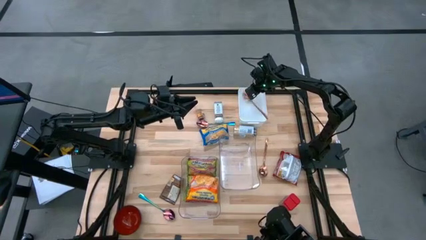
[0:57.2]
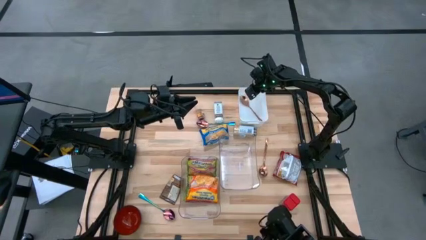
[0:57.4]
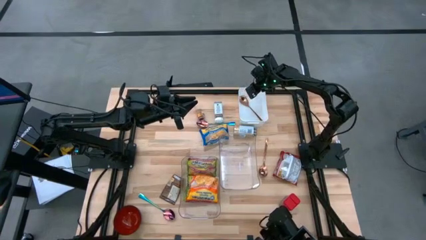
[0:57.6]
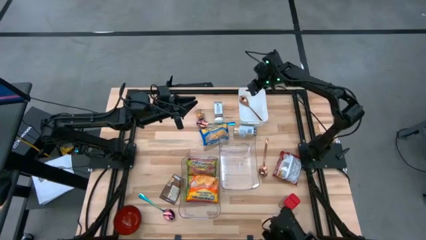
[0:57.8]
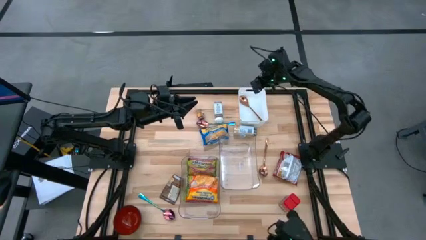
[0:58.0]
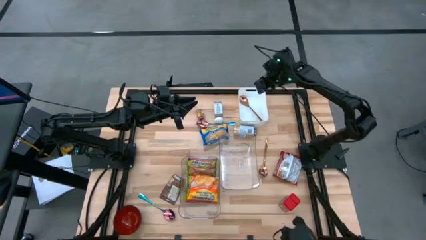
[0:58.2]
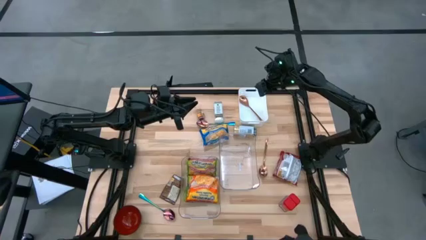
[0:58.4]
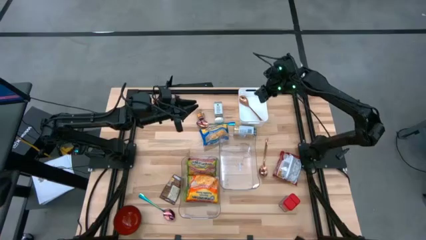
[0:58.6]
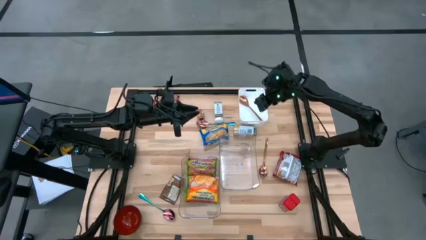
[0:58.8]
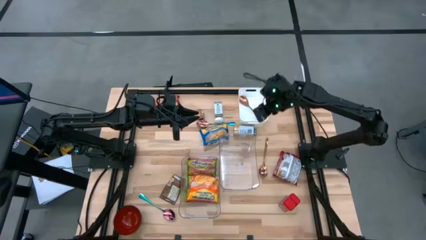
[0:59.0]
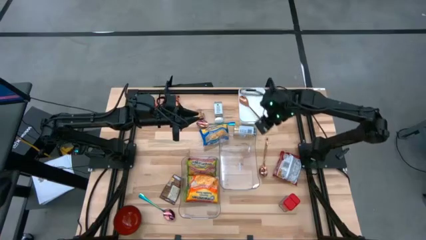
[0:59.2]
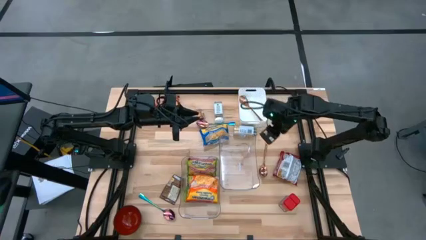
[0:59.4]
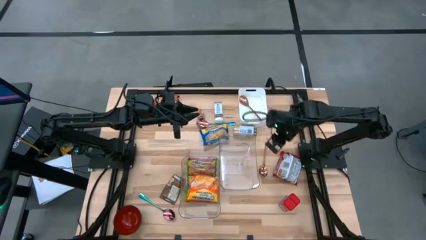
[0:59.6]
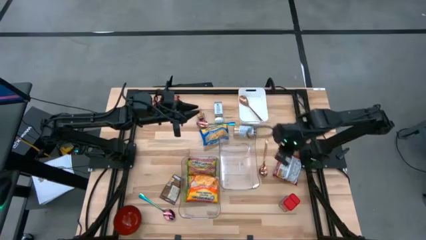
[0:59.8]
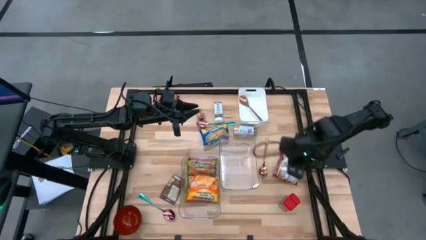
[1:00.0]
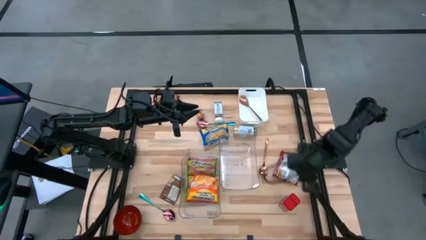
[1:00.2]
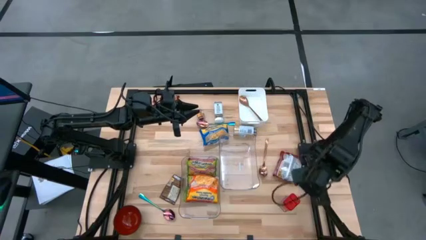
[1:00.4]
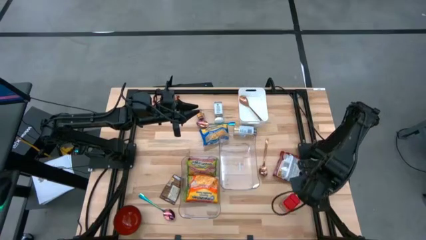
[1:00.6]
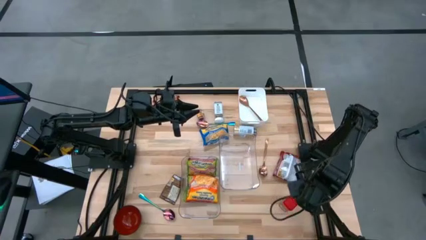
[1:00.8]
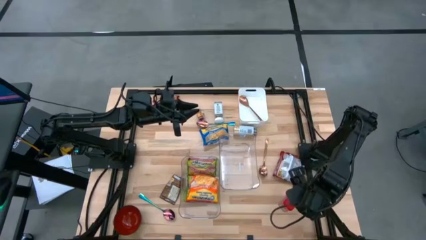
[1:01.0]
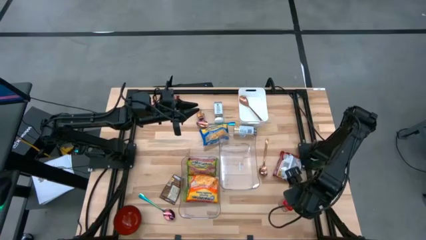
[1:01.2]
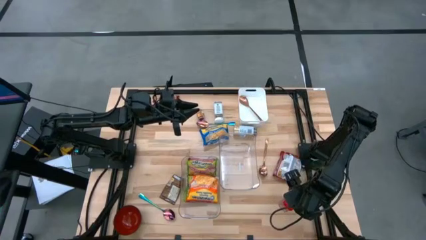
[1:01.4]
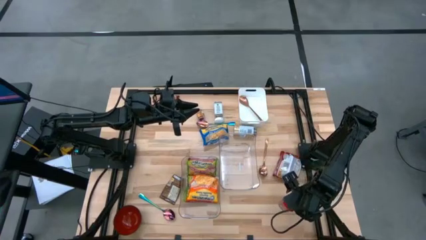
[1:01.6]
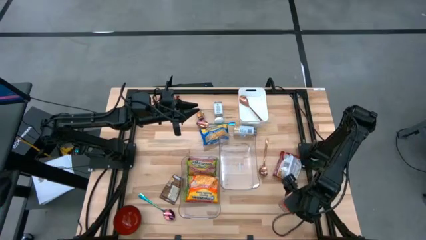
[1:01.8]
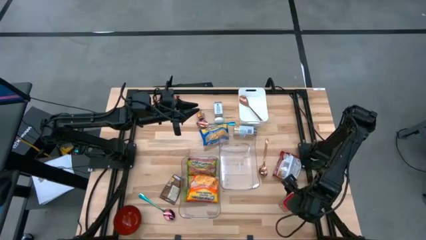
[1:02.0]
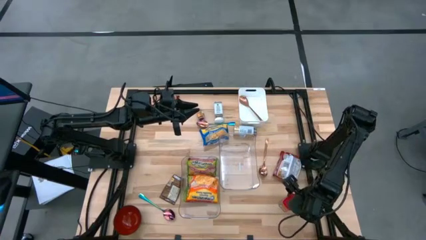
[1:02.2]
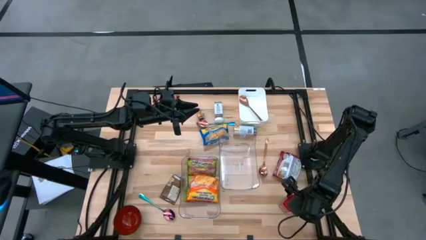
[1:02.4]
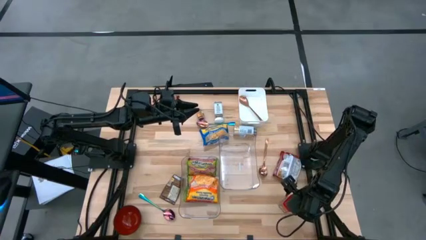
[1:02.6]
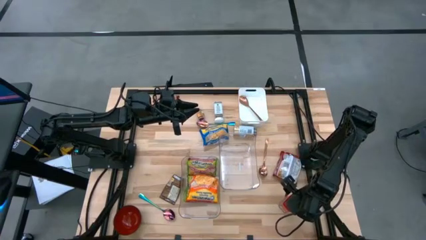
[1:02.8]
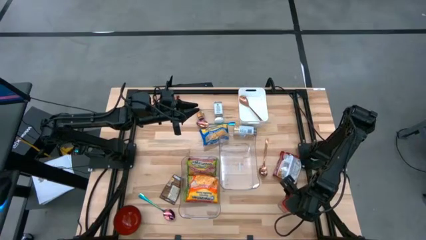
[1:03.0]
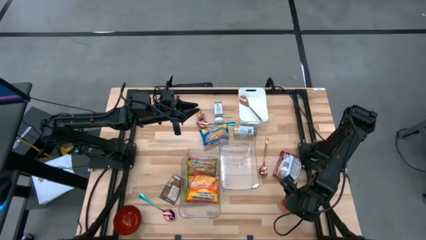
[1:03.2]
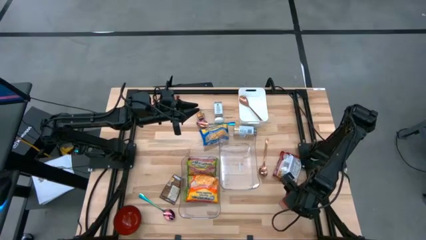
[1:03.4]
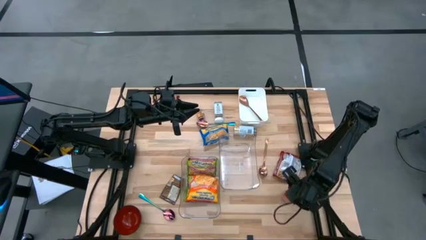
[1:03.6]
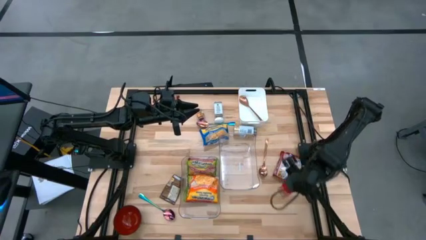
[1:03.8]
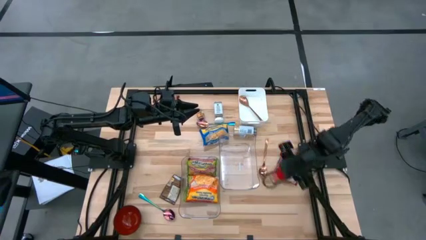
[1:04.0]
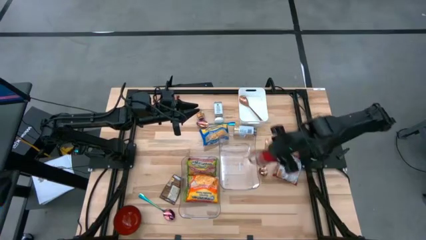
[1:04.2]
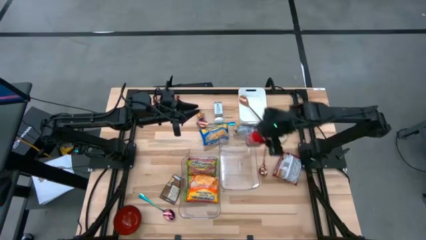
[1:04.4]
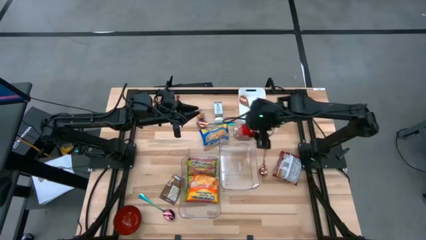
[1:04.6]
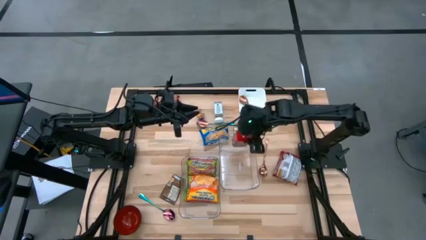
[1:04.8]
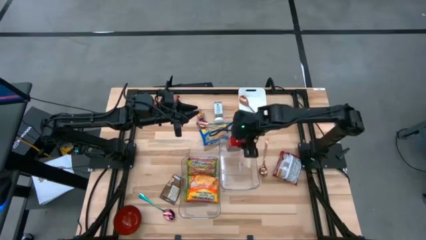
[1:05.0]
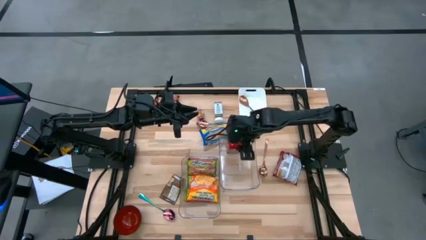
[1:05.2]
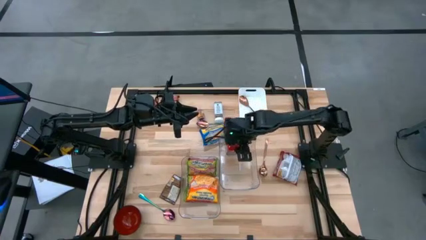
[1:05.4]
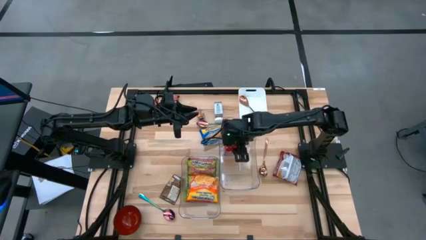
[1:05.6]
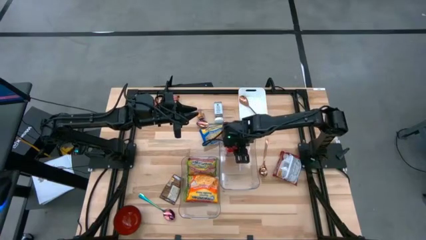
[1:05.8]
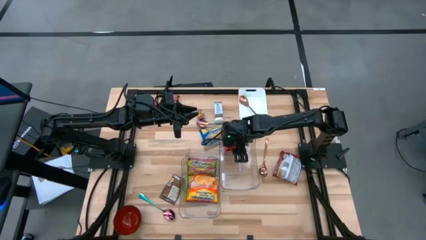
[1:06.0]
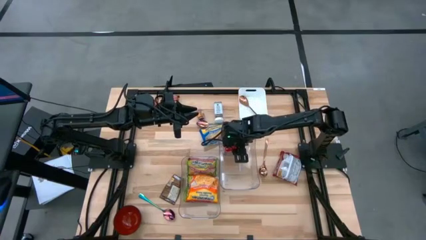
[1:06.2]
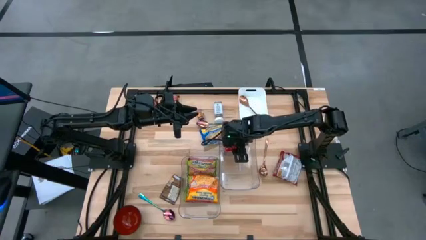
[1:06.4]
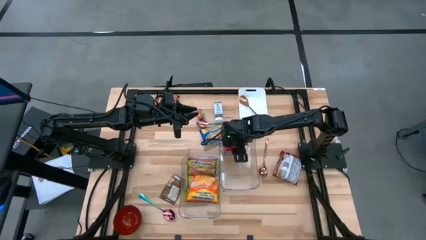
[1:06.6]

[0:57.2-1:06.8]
Task: Pick & Place Food Item
Put the red seasoning can into the right transparent bin

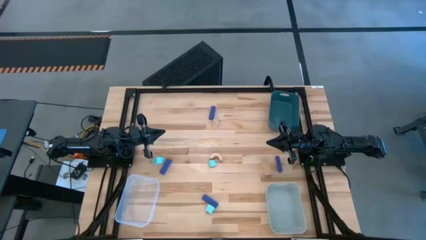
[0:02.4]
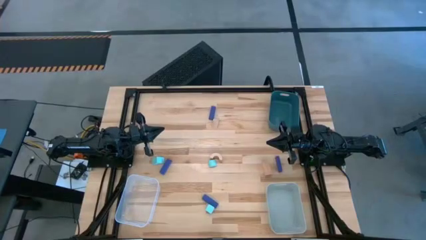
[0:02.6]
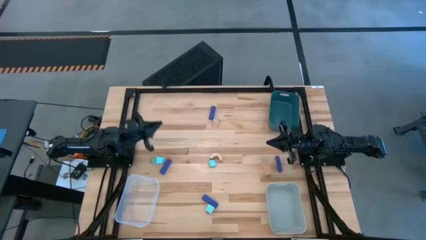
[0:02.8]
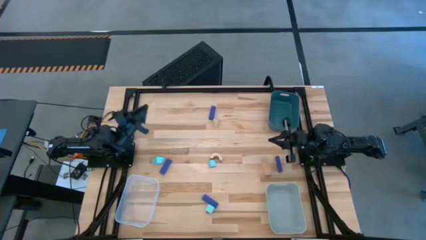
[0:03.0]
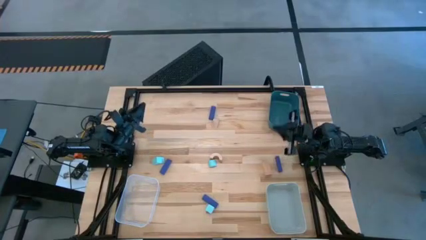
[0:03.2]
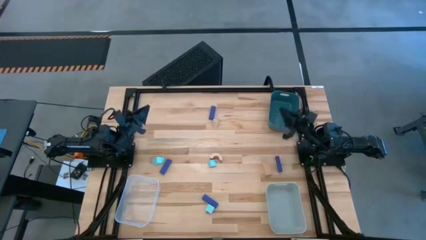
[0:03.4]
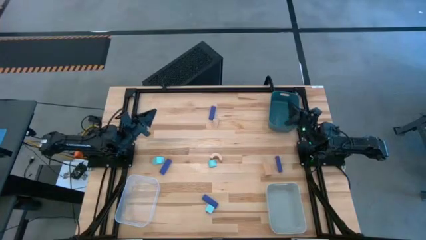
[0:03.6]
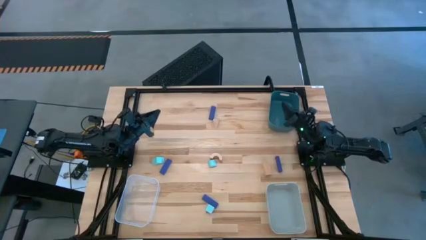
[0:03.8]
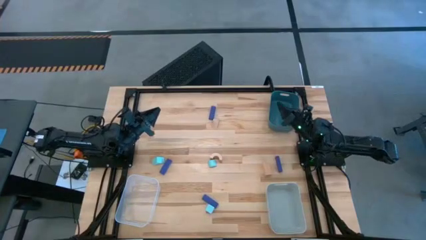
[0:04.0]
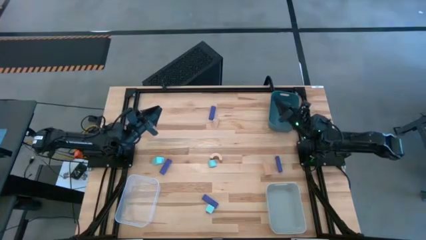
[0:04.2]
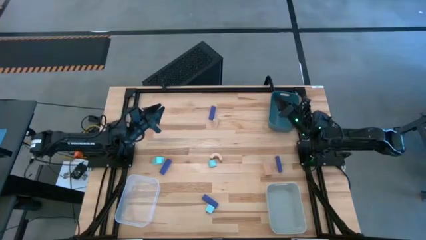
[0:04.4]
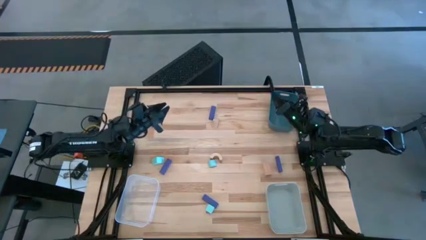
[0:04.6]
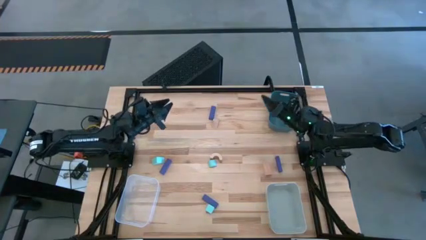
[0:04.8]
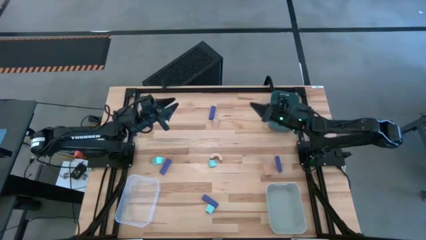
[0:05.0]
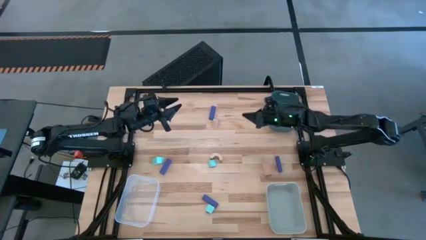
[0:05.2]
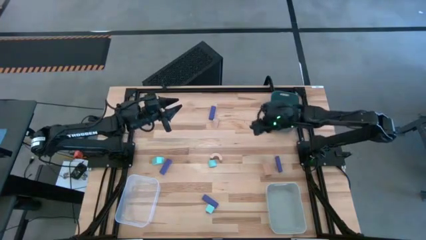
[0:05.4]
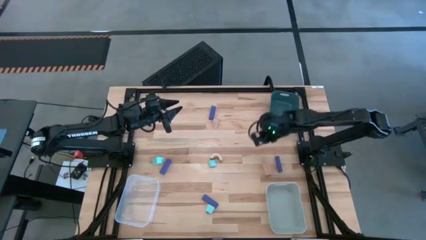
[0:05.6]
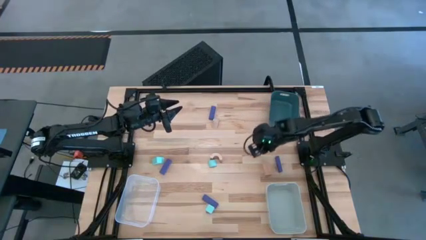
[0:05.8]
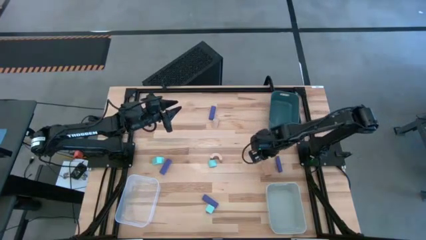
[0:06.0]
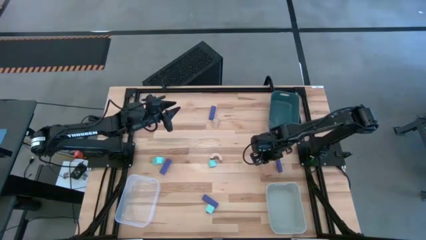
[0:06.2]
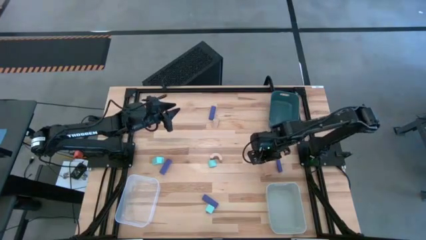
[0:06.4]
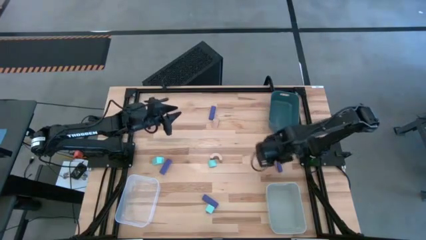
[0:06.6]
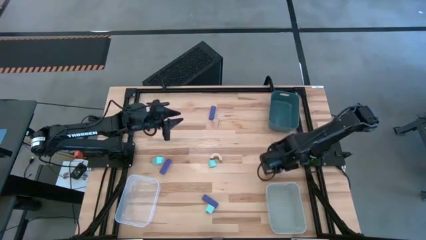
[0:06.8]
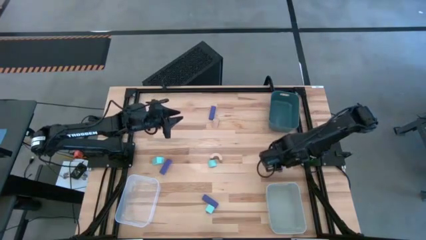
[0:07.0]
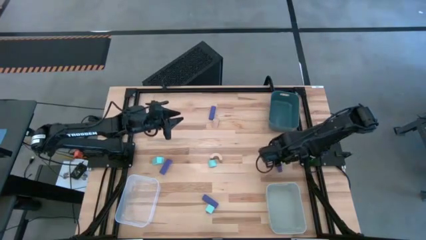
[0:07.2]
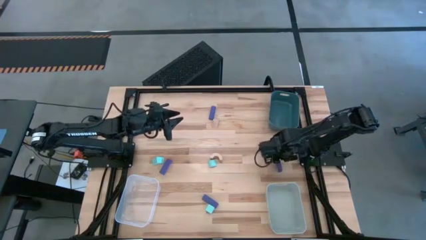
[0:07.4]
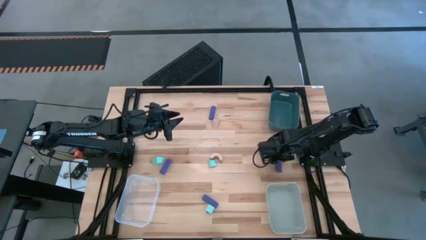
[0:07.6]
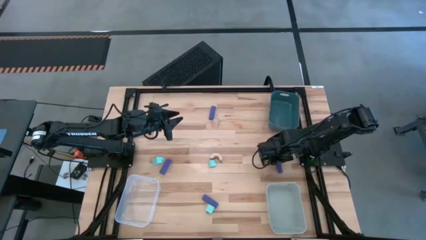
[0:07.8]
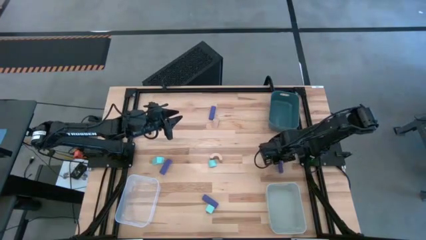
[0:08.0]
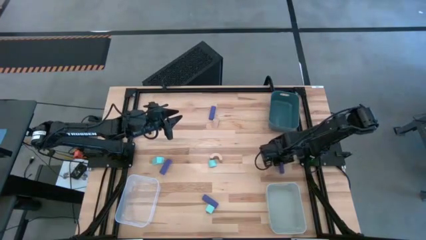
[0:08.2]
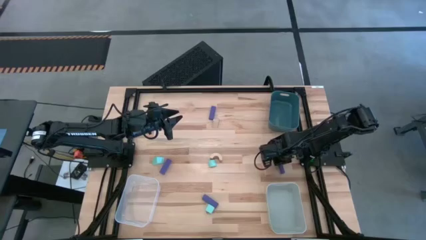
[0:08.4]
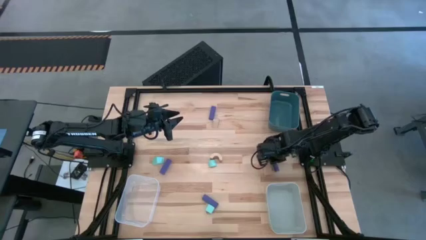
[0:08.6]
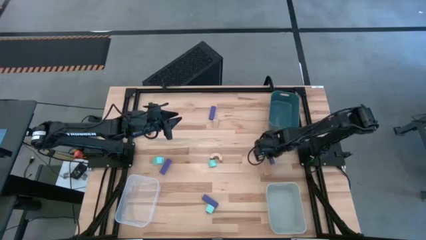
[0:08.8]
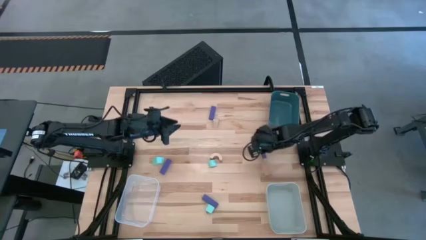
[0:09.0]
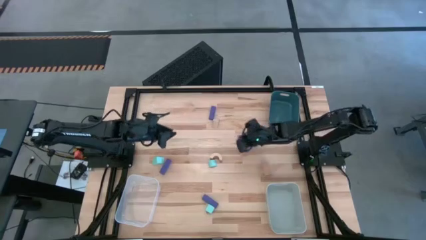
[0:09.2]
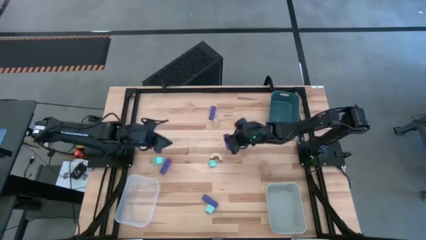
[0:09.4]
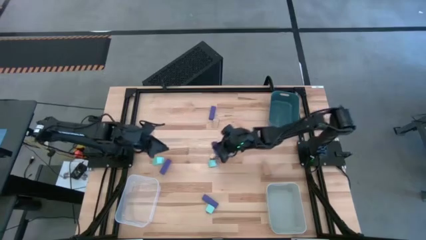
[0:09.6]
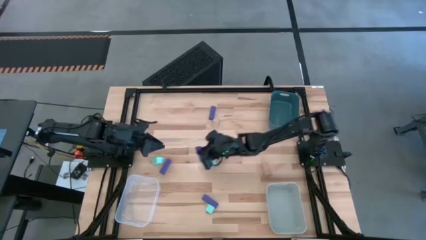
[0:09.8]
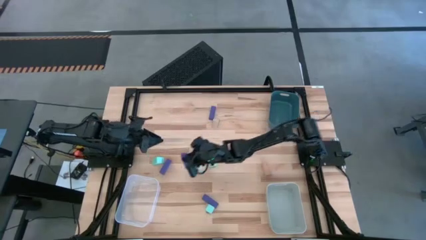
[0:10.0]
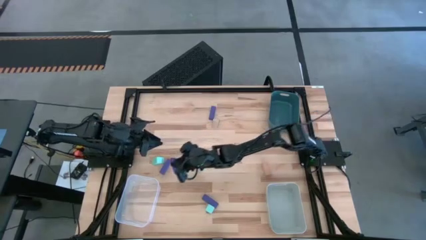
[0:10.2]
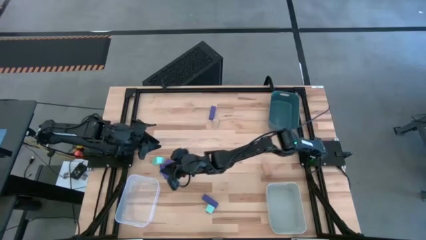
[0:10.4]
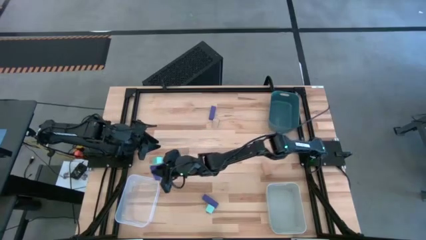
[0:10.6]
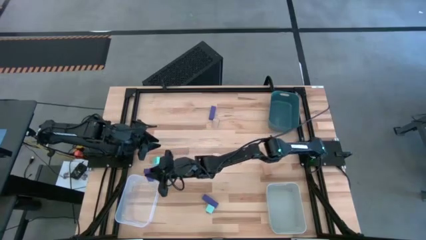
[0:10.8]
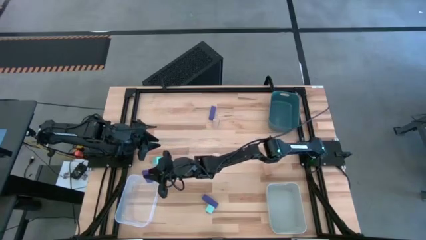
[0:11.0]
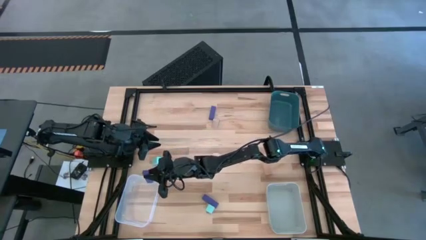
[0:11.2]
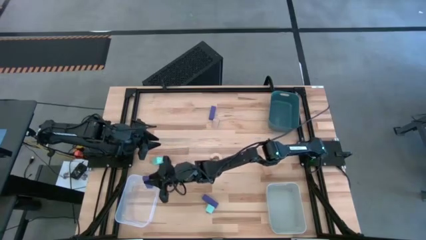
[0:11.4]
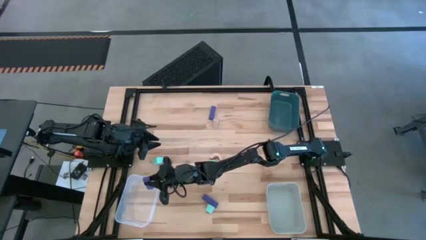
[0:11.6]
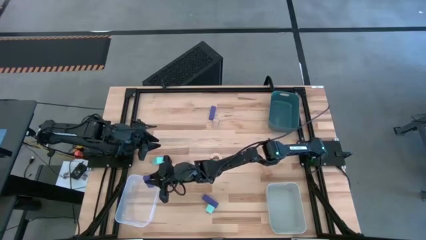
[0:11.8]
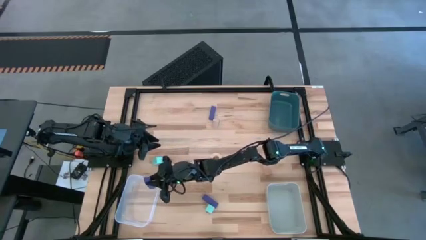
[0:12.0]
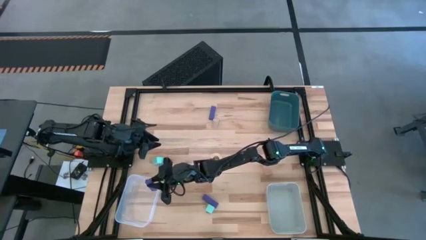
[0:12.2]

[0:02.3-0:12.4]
Task: Sort & place blocks by color
Put the middle right purple block into the transparent bin
